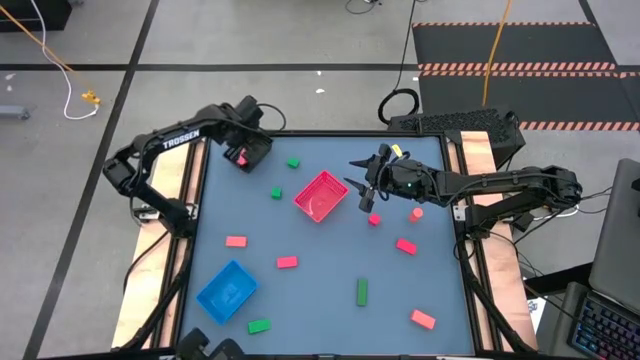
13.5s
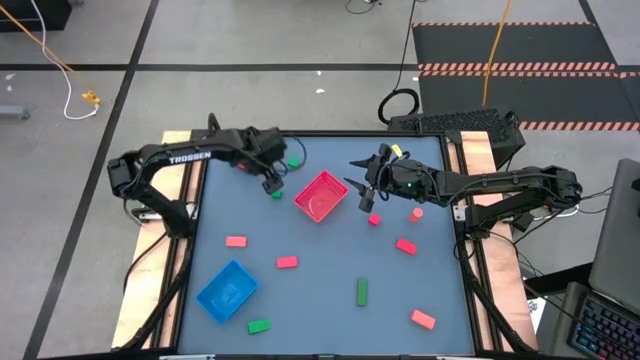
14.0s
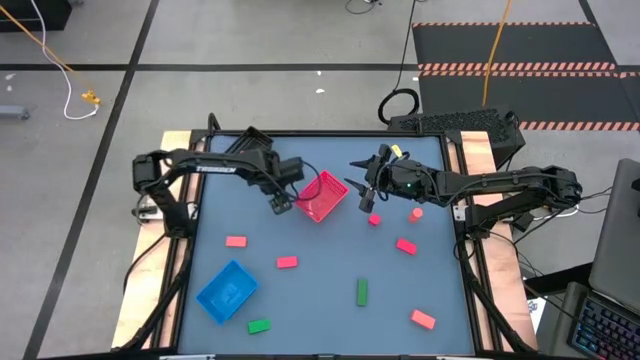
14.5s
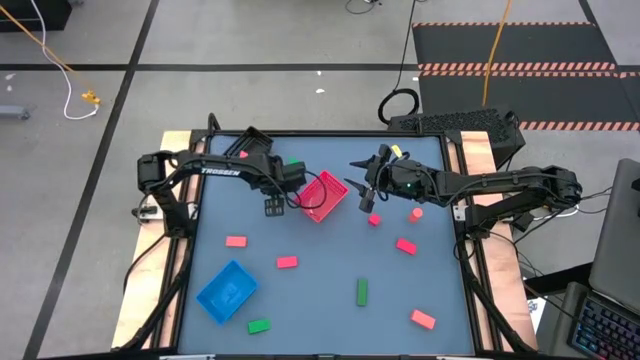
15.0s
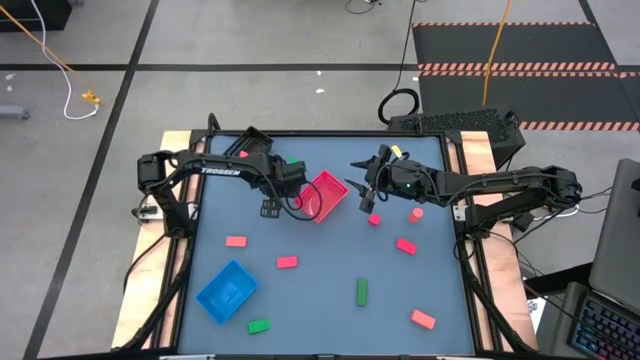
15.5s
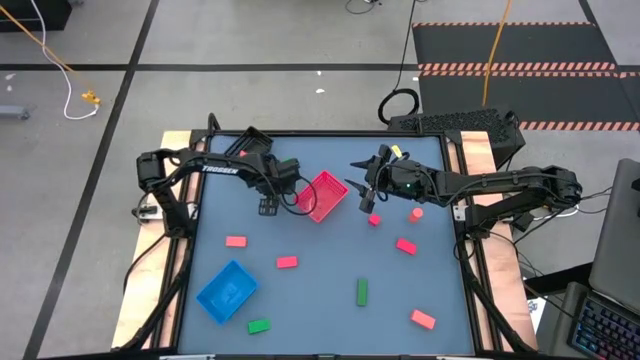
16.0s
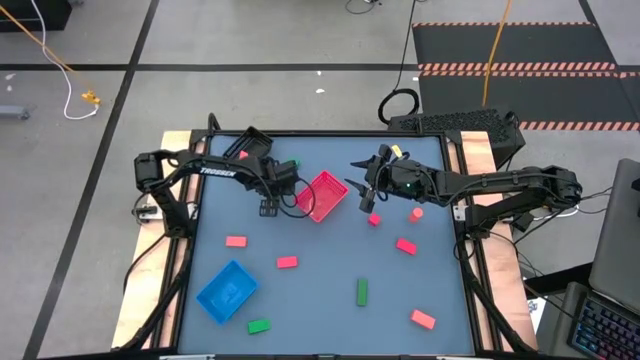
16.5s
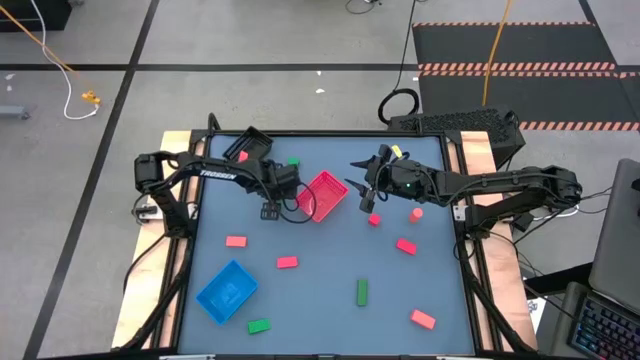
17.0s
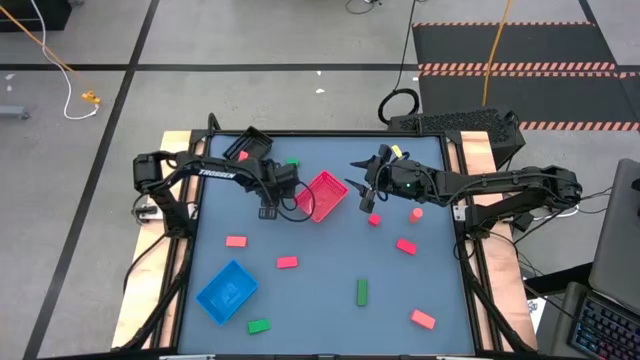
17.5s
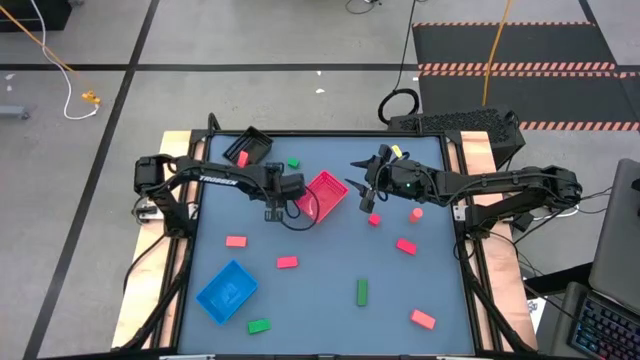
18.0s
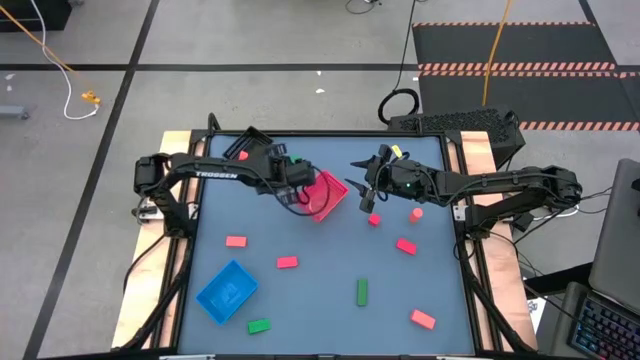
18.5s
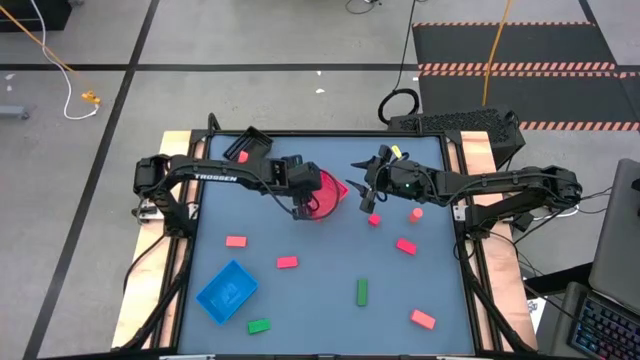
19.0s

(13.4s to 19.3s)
Task: Sort & place blocks by color
Put the green block into the orange bin

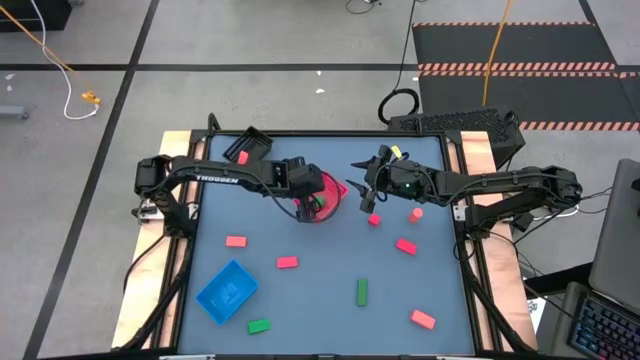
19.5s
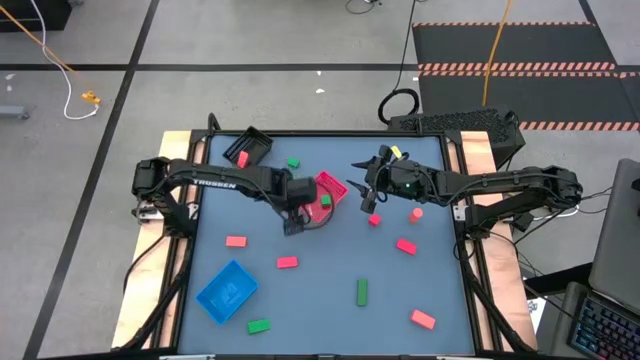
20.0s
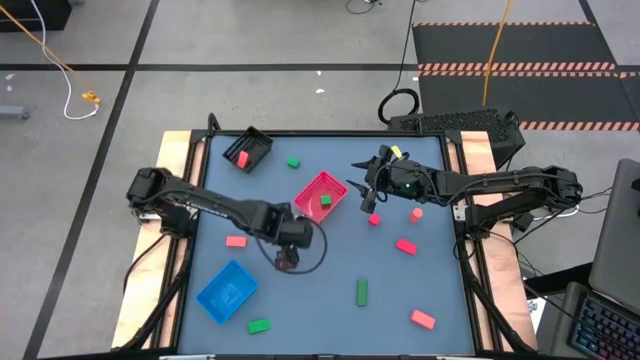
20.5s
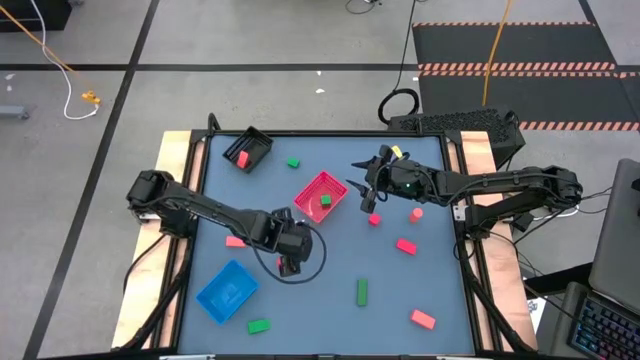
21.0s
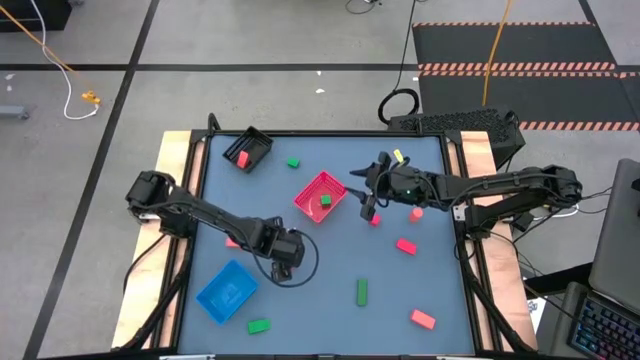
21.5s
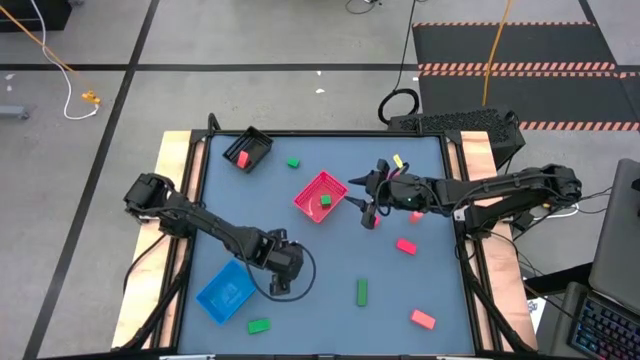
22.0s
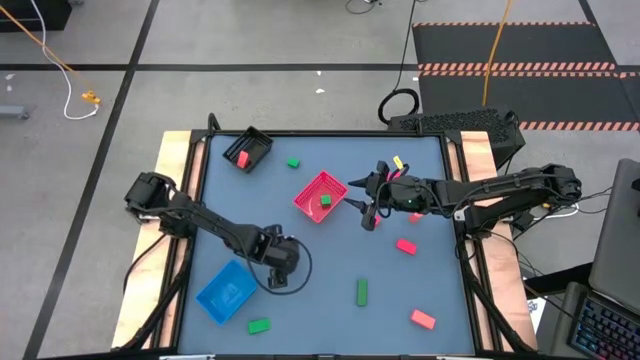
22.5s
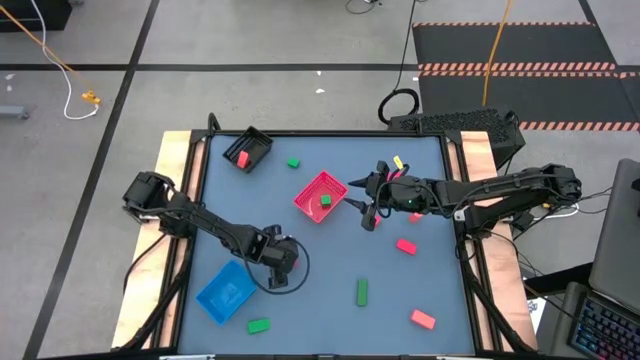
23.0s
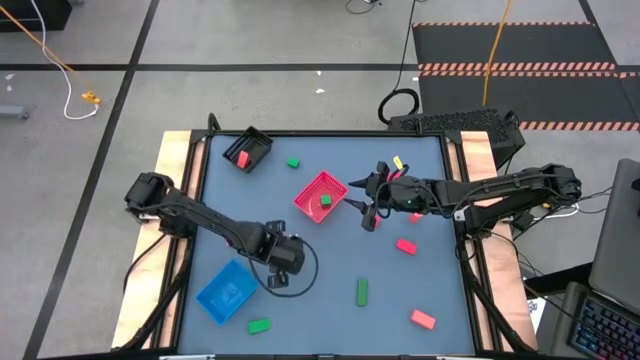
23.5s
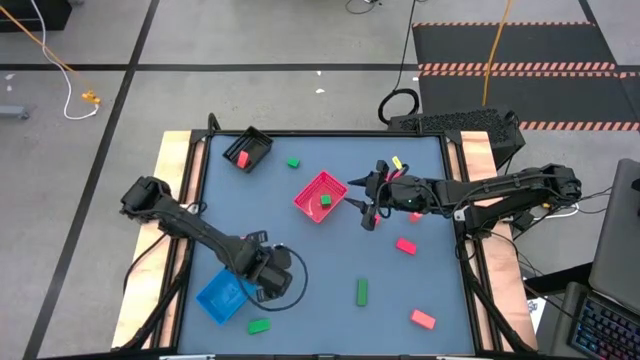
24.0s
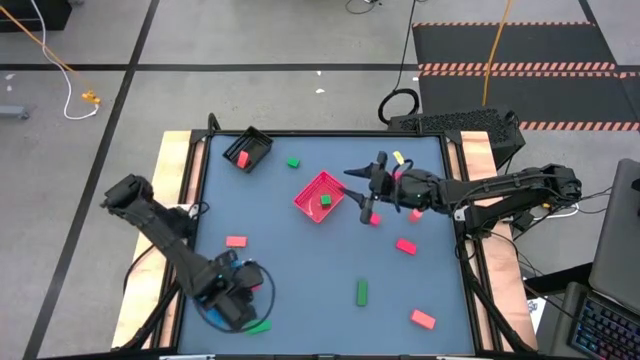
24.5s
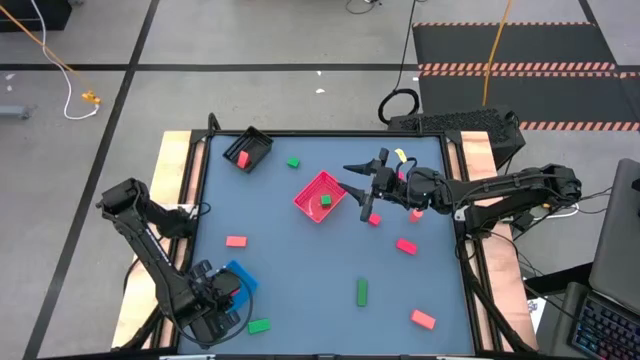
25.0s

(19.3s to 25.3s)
Put the red block into the blue bin

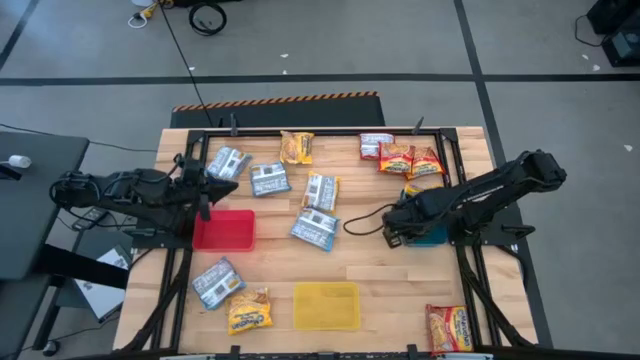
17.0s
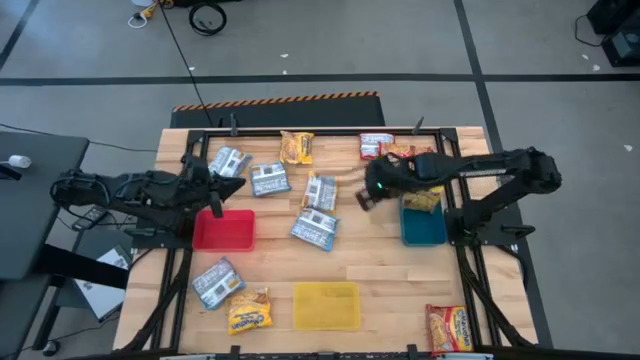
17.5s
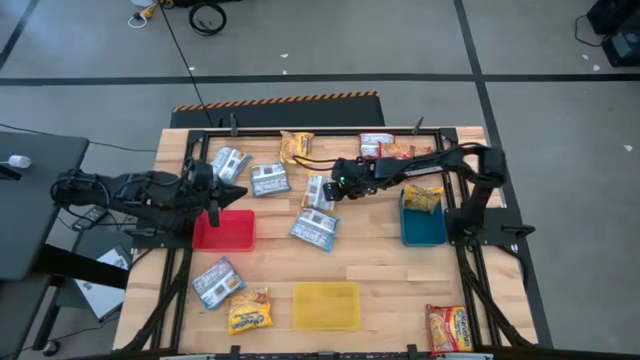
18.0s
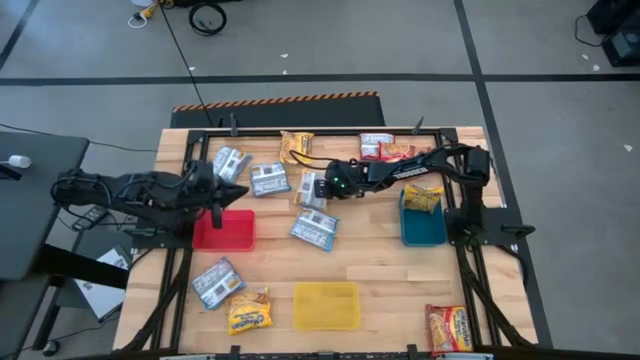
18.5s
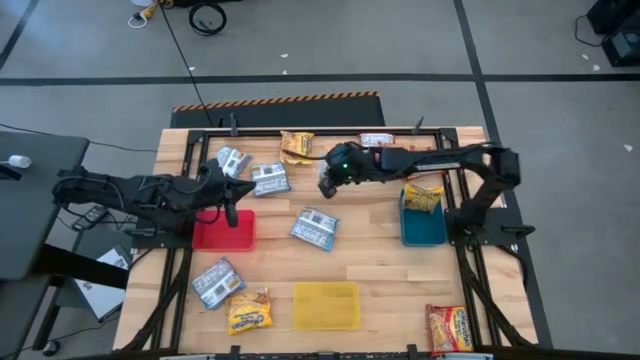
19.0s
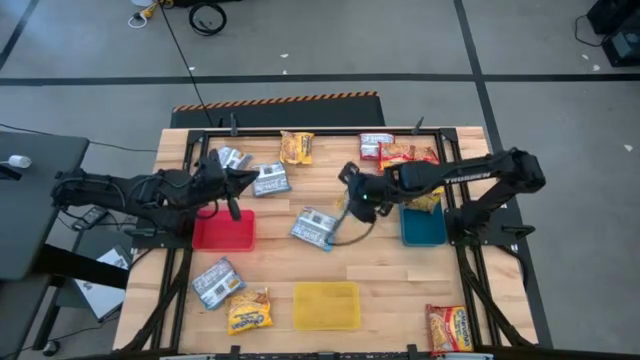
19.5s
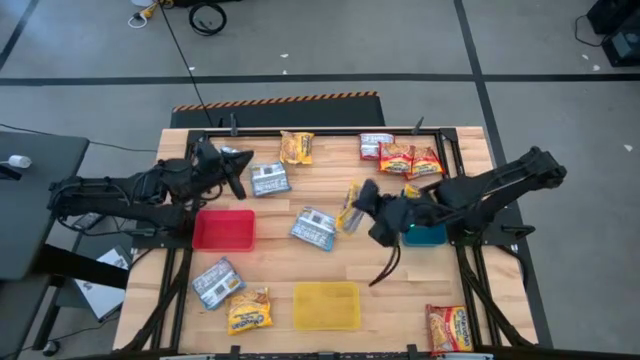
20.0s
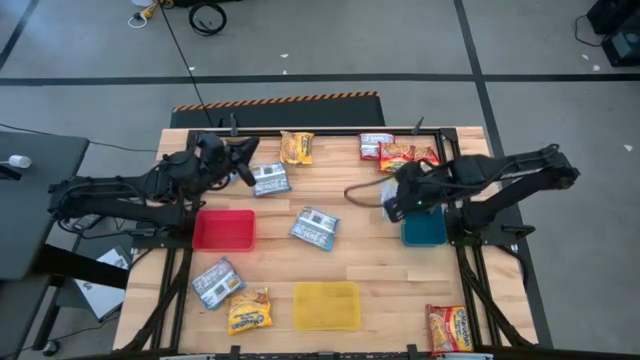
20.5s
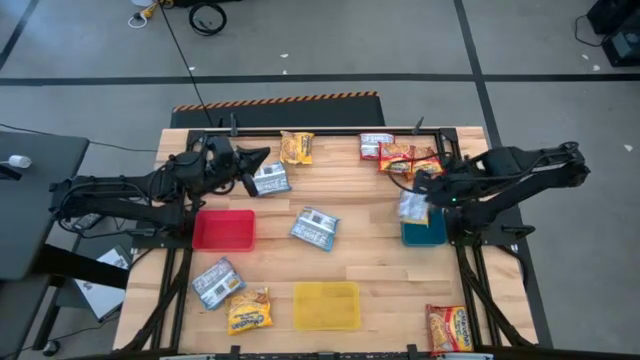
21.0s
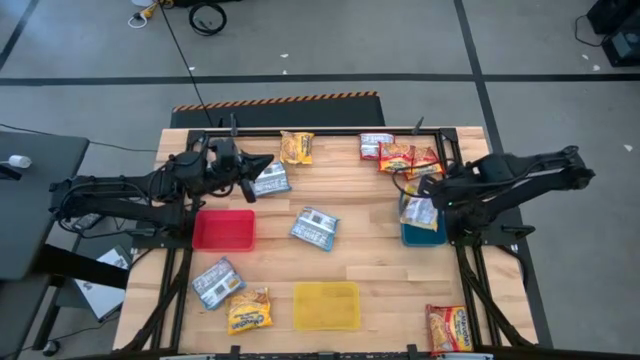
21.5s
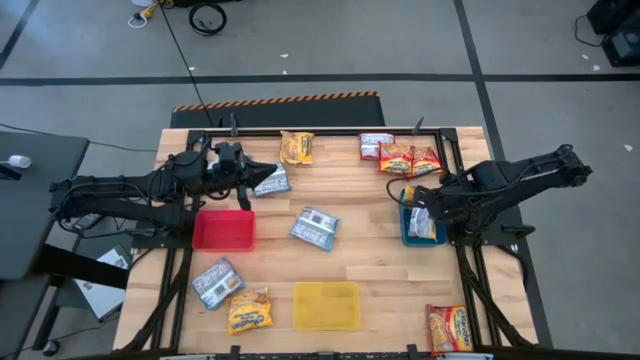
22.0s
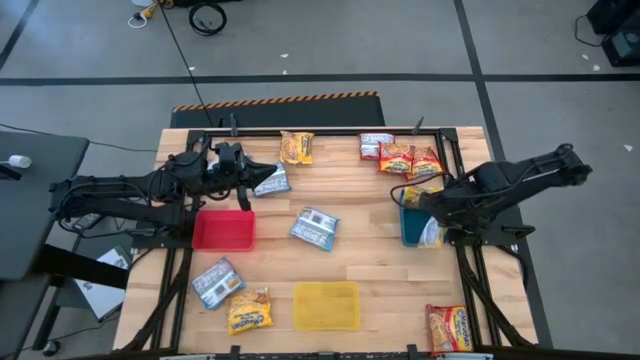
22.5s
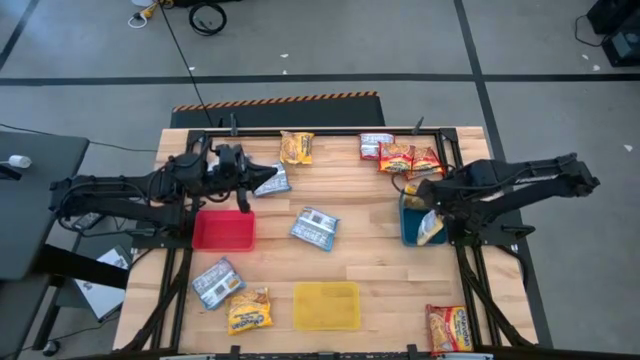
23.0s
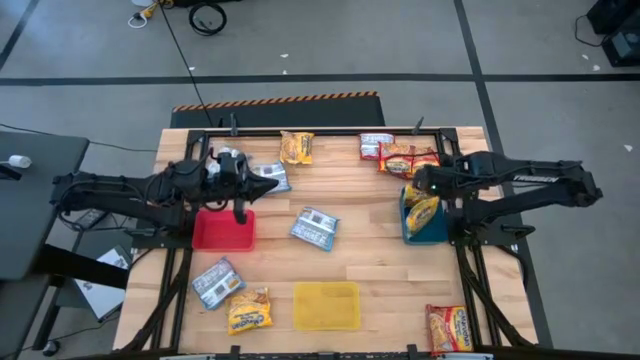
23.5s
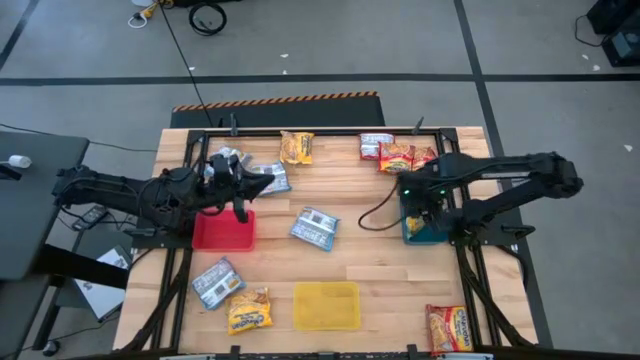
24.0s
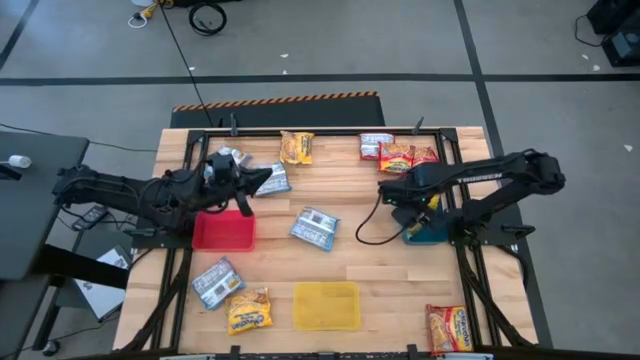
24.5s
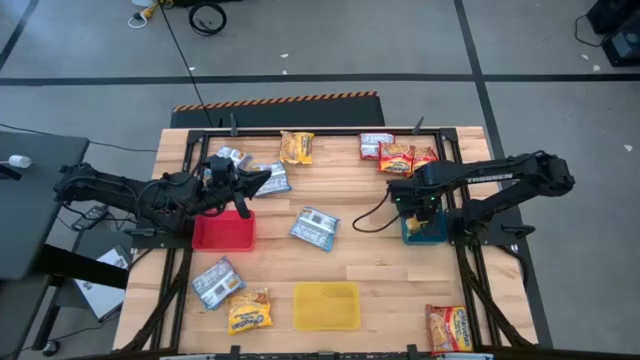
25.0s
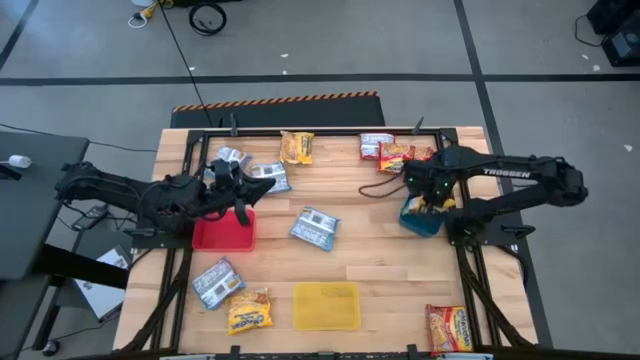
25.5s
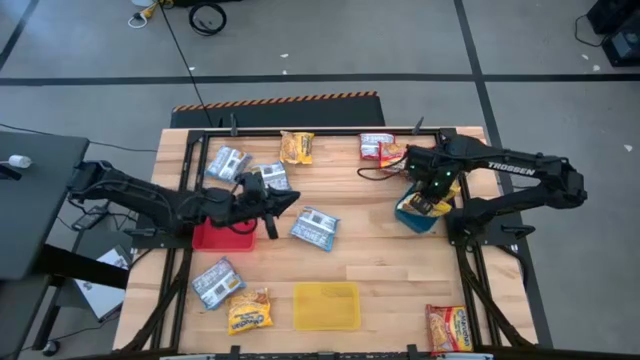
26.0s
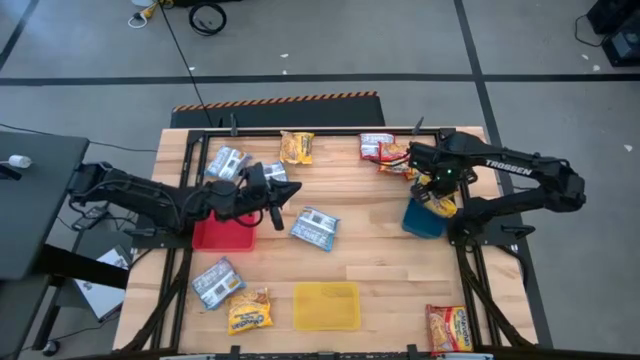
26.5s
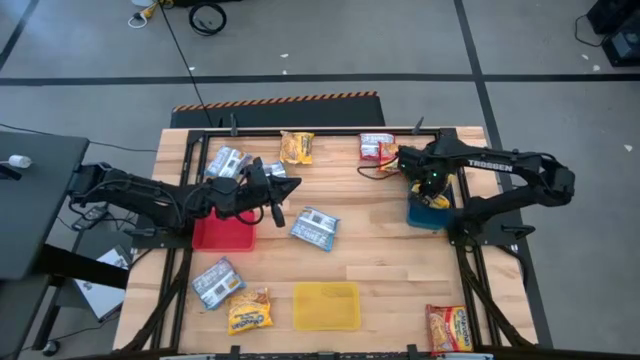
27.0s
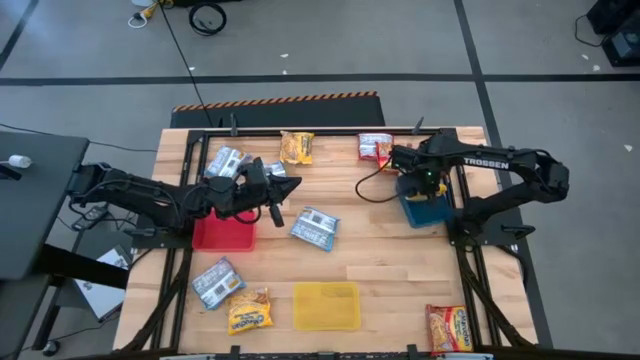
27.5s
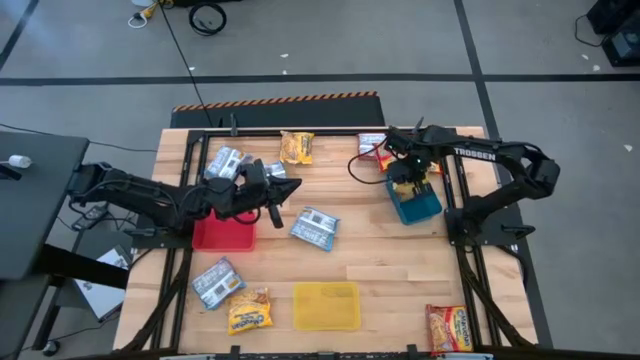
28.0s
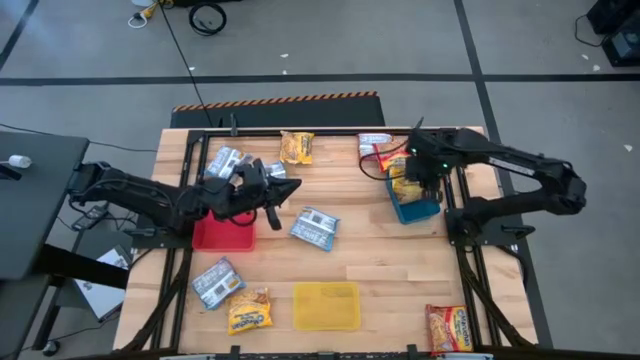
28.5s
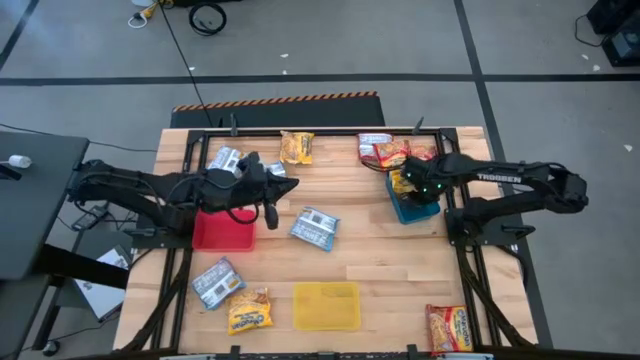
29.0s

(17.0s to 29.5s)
Task: Sort Maruchan noodles
Put the yellow noodle pack into the blue bin
